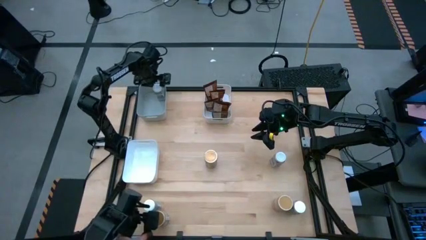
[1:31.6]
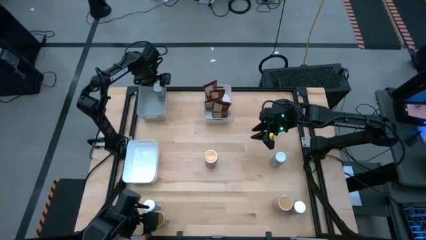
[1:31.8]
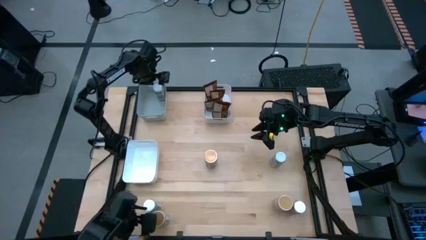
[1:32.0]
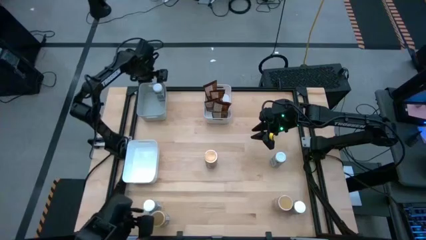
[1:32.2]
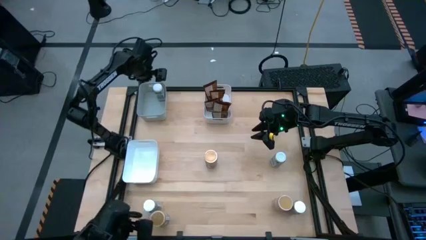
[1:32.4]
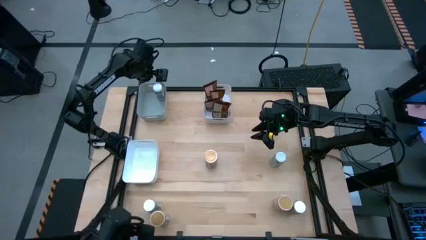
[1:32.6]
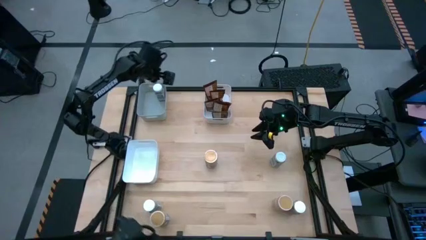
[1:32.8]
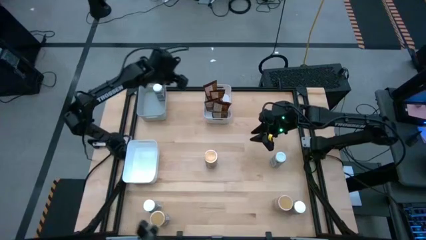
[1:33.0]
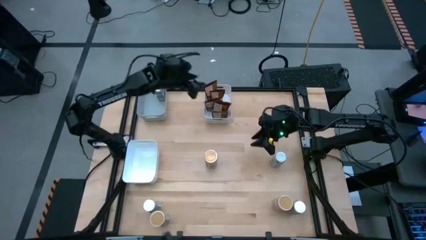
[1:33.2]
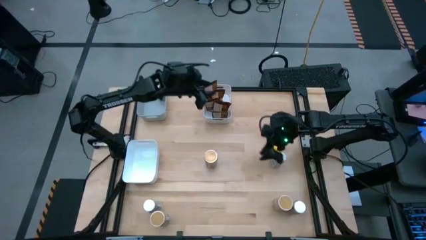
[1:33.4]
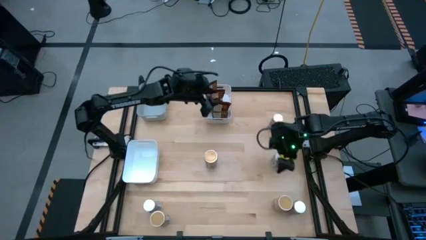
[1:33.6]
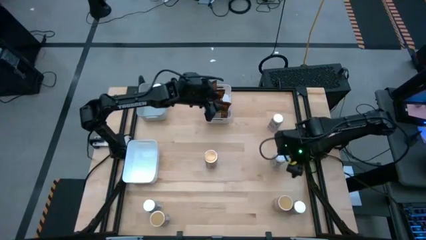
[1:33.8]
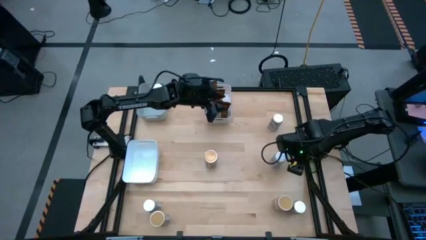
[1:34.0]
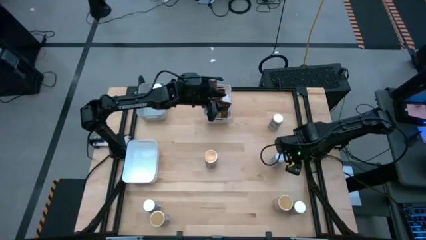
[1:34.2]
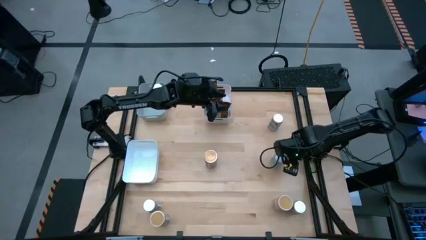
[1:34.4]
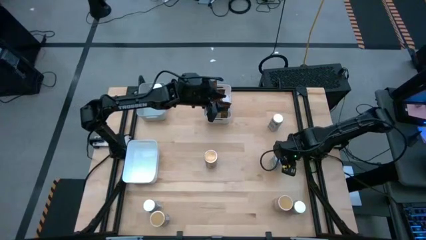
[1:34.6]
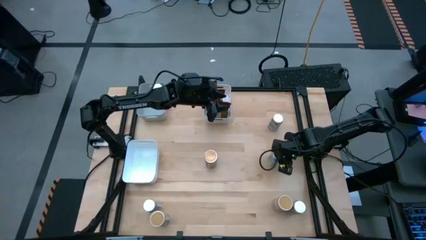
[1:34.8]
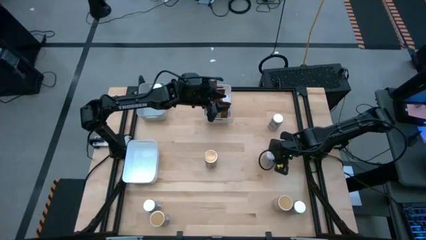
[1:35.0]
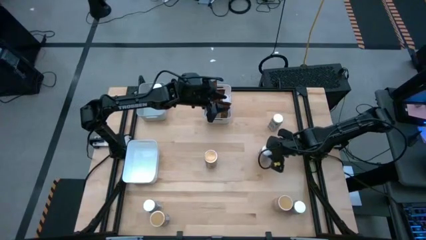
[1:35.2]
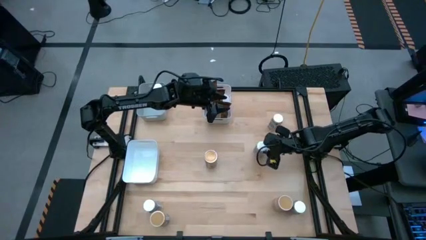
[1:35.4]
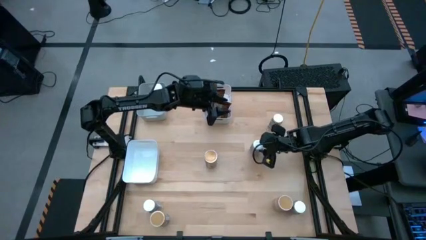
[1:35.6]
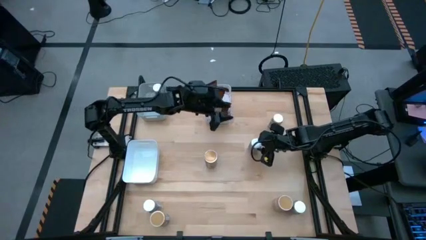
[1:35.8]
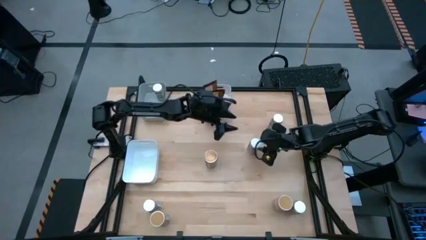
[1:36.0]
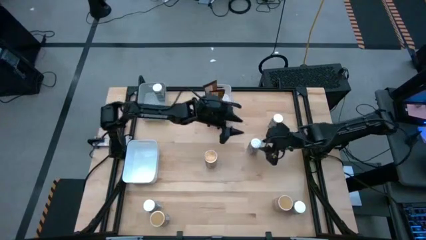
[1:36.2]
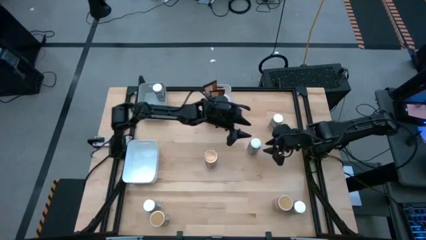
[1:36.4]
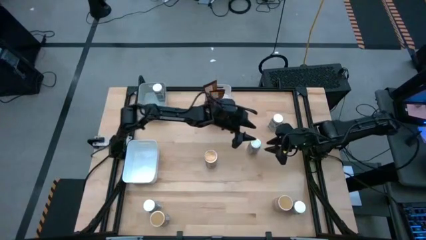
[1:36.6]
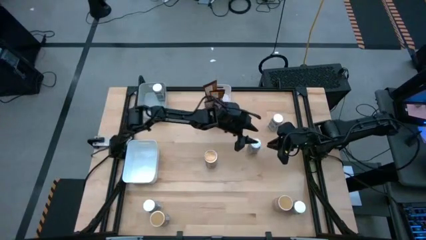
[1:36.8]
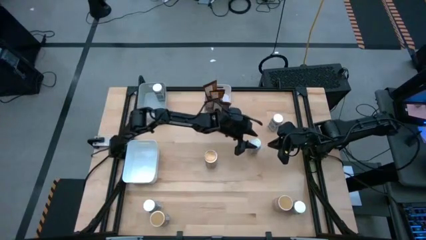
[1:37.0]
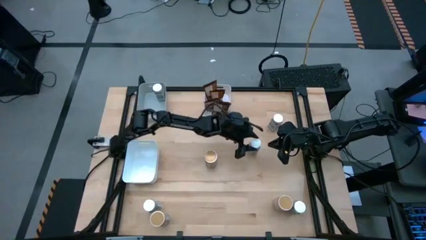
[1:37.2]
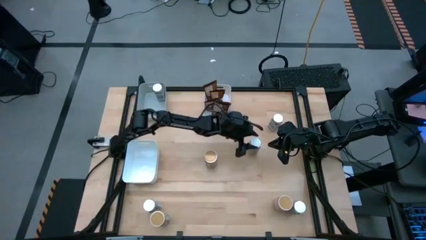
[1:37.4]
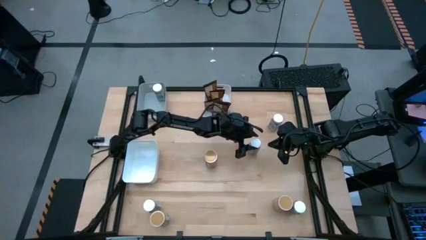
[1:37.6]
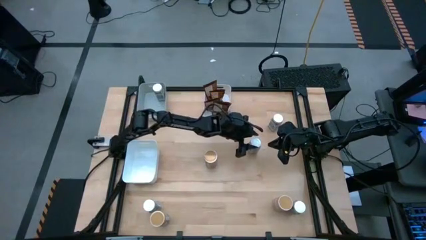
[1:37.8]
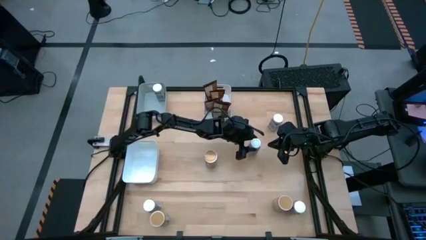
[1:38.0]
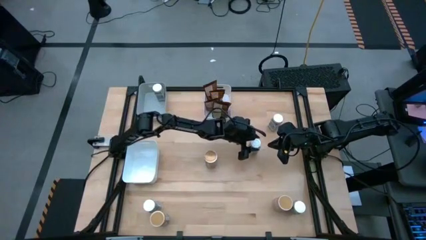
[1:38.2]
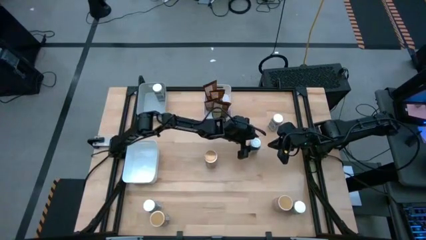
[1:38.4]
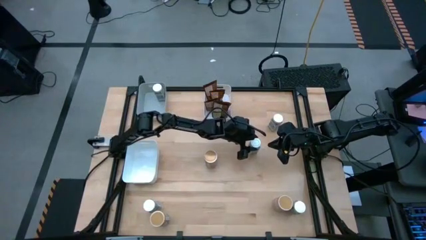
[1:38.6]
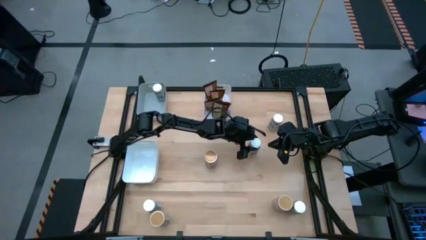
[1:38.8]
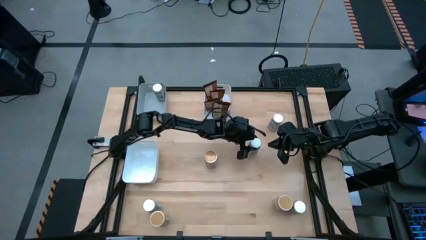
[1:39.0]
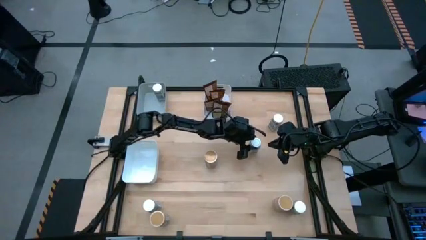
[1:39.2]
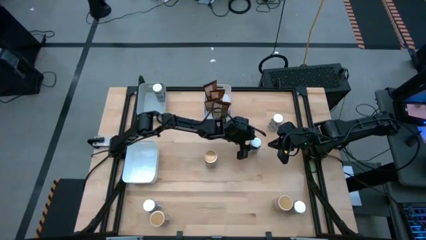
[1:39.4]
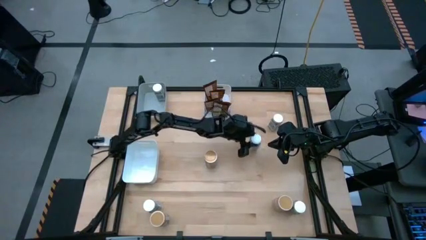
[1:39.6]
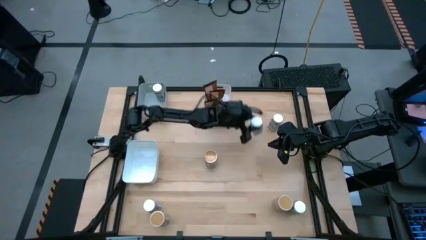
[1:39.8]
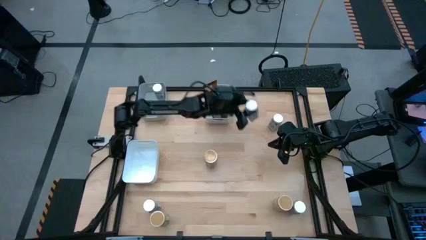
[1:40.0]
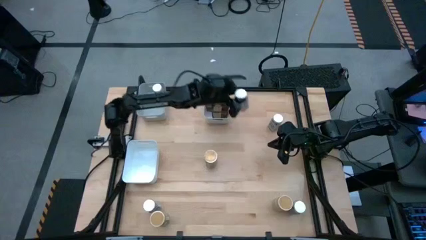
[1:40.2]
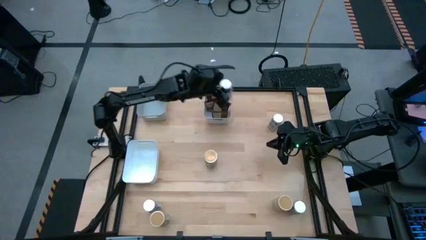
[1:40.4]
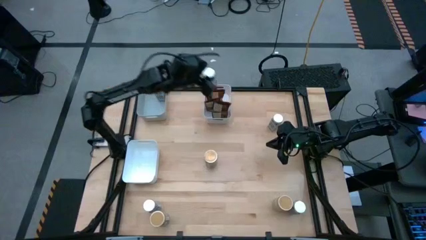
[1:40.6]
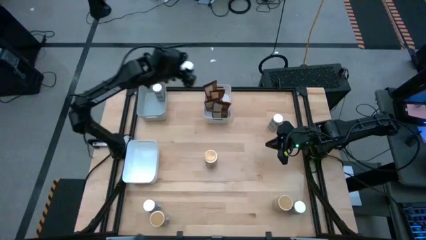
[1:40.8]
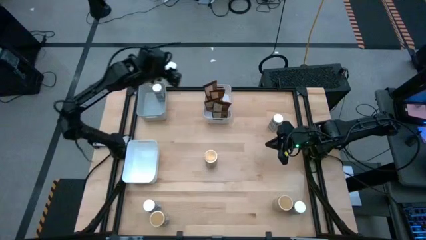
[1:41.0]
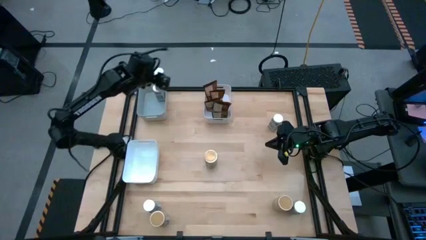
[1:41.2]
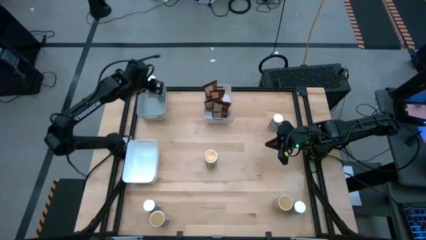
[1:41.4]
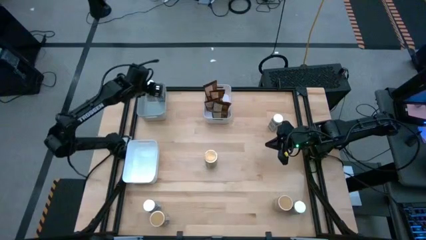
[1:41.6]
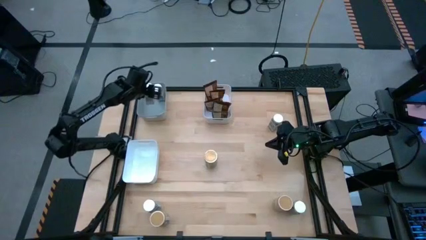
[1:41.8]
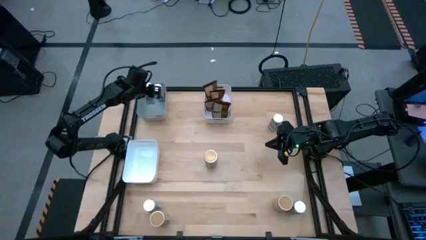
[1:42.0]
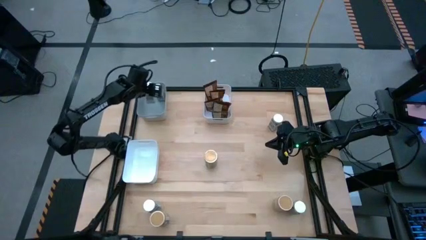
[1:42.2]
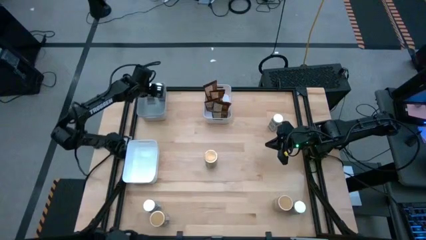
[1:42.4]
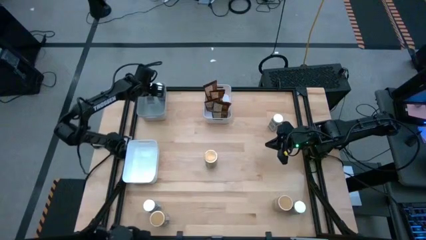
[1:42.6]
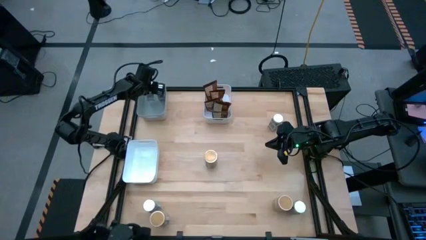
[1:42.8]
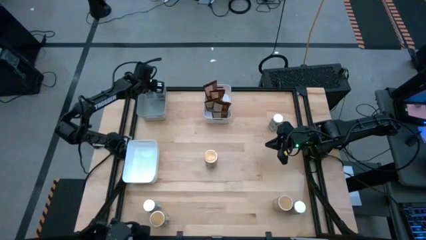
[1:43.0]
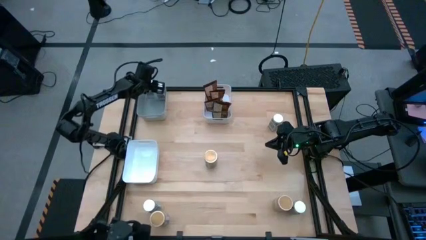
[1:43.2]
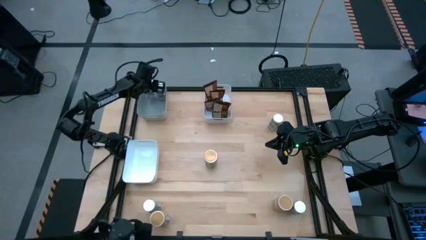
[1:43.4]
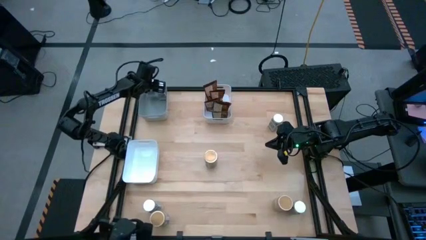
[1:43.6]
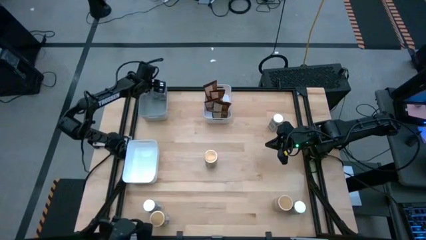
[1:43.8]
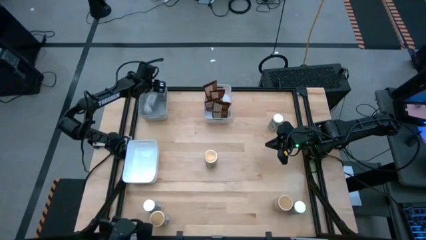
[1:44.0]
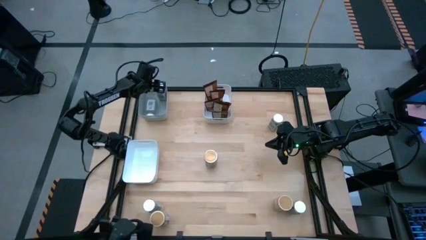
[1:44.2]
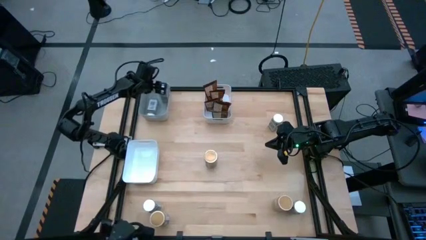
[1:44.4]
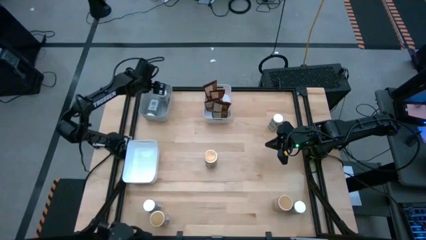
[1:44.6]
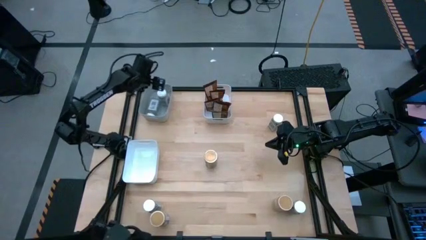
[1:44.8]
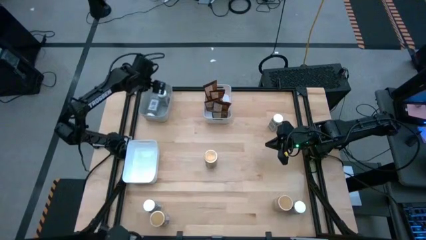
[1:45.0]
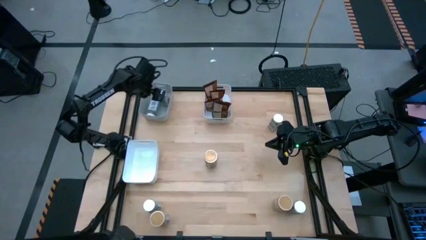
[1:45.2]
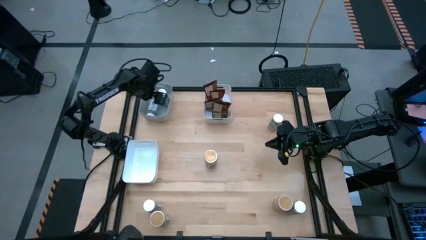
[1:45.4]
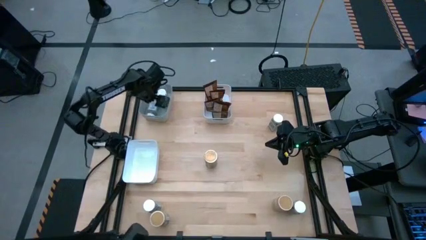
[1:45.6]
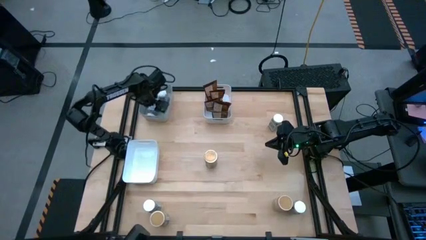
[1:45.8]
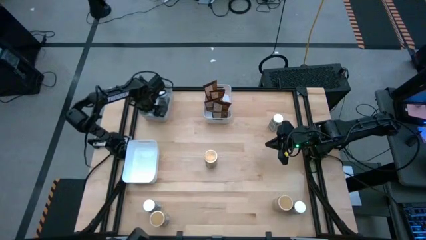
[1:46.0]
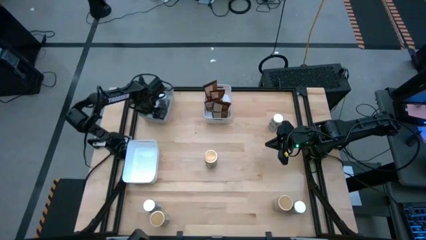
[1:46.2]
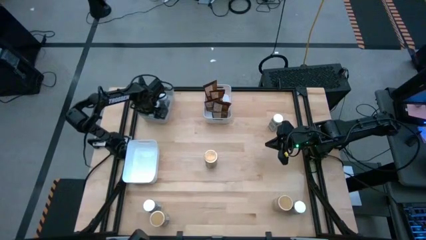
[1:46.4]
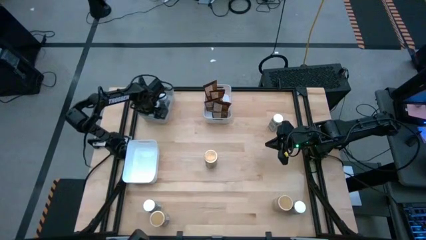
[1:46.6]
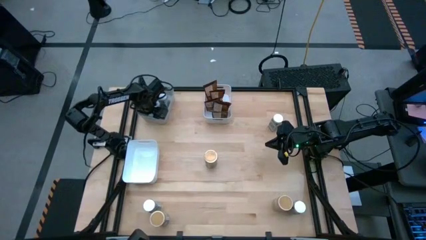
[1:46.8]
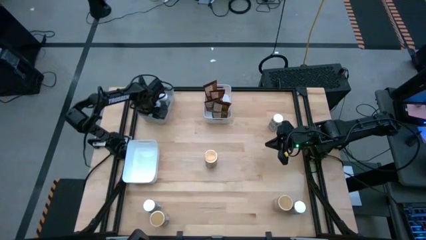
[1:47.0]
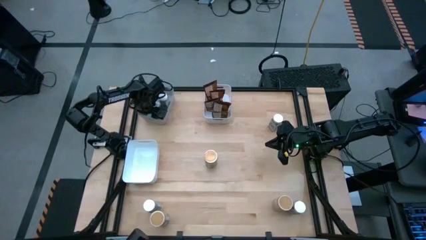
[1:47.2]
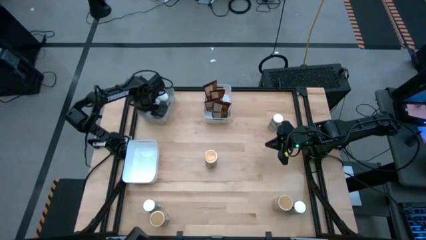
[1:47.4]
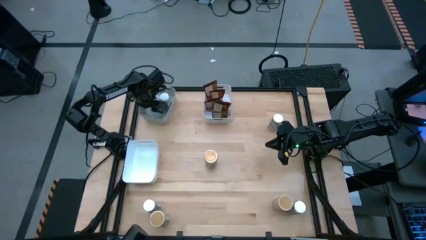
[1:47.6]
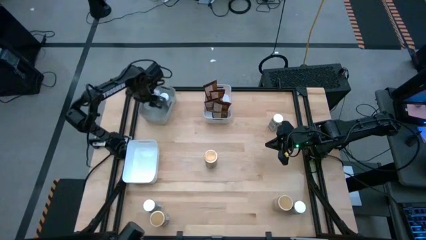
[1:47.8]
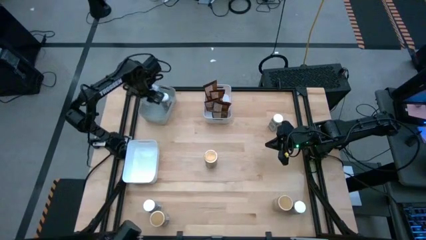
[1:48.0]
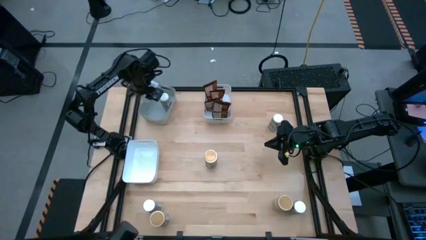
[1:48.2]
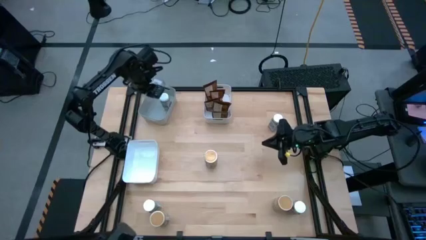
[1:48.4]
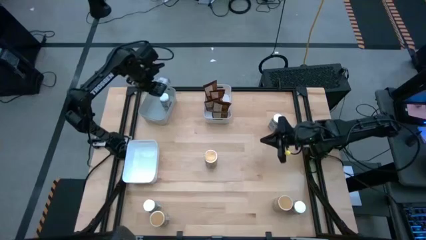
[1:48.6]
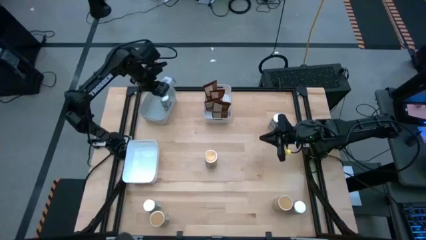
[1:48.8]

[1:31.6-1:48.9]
Task: Sort spices by type
Put the white seasoning bottle into the gray bin
